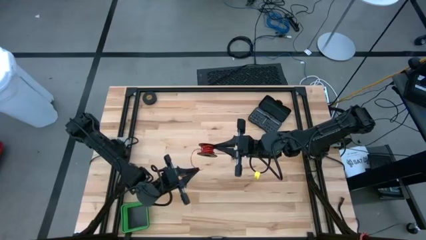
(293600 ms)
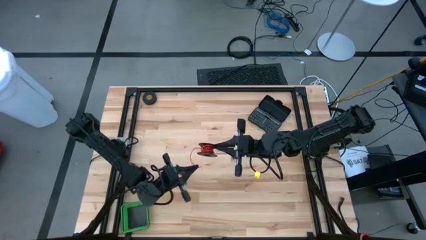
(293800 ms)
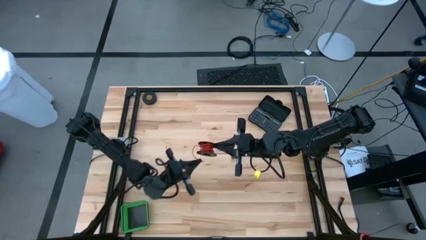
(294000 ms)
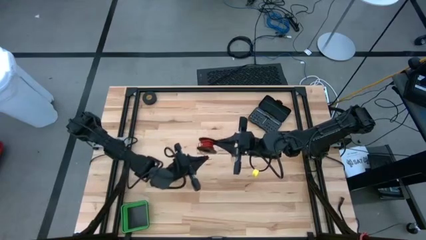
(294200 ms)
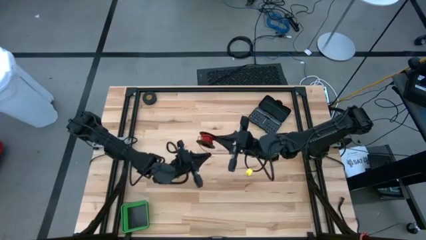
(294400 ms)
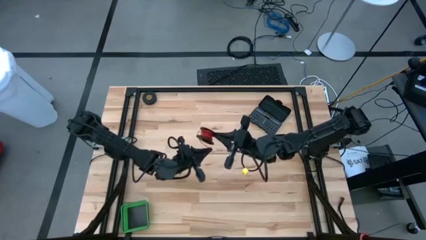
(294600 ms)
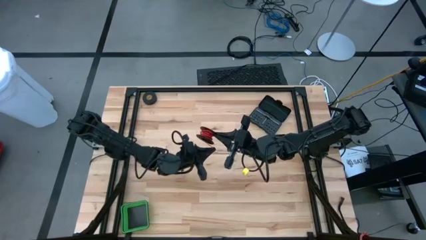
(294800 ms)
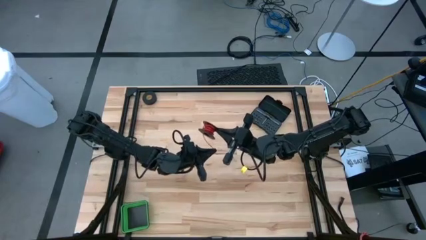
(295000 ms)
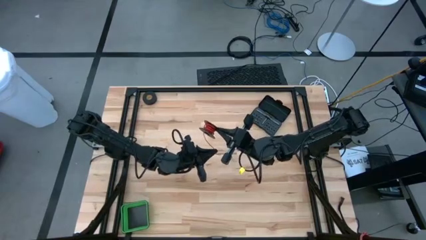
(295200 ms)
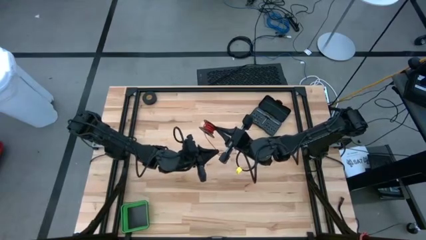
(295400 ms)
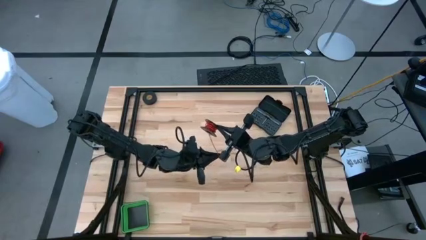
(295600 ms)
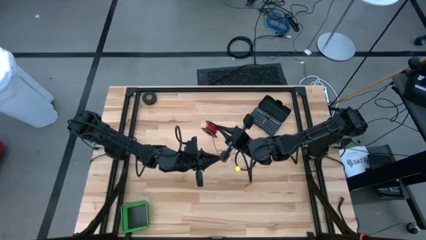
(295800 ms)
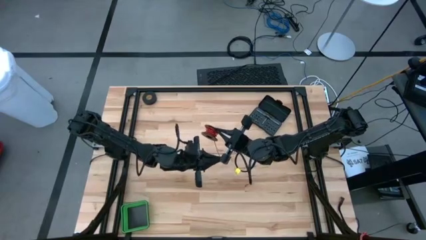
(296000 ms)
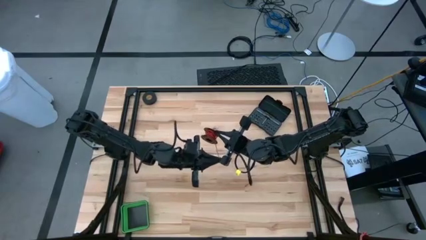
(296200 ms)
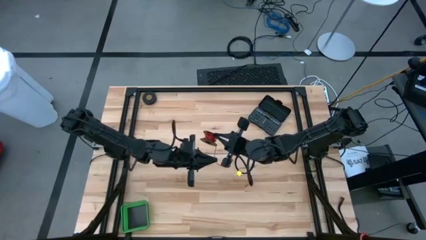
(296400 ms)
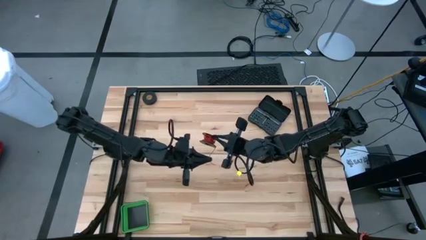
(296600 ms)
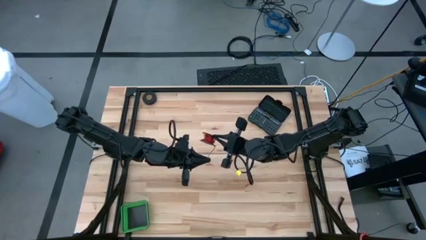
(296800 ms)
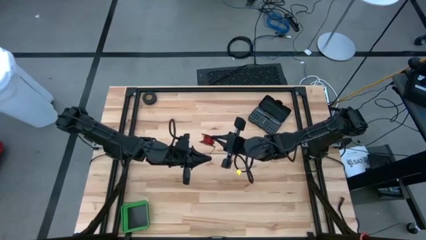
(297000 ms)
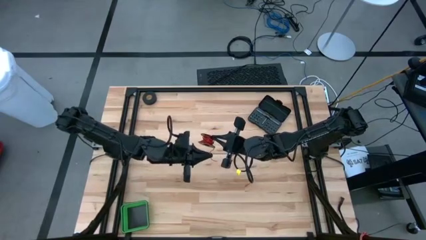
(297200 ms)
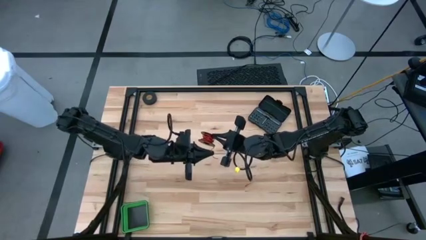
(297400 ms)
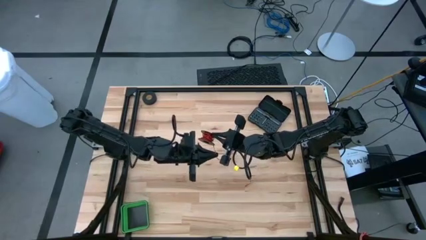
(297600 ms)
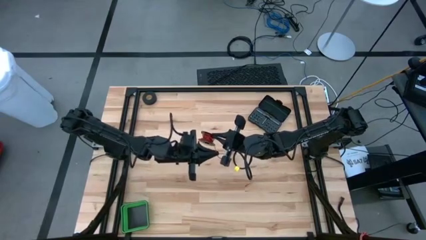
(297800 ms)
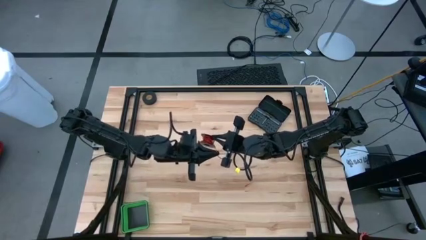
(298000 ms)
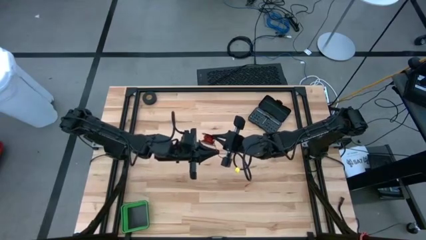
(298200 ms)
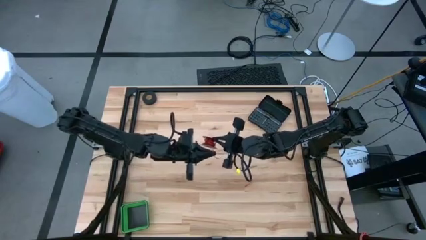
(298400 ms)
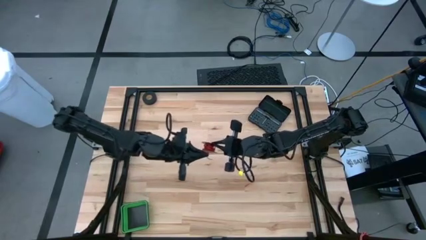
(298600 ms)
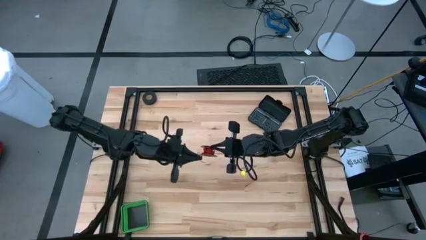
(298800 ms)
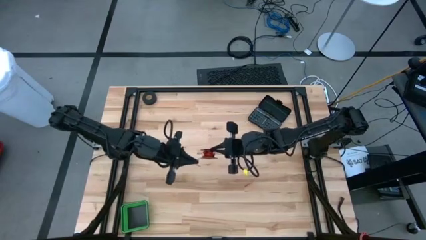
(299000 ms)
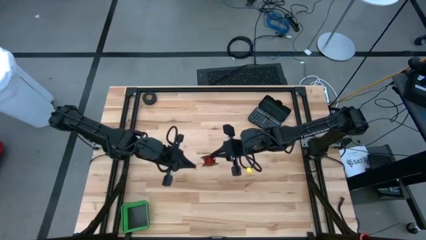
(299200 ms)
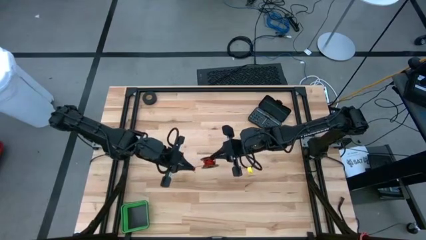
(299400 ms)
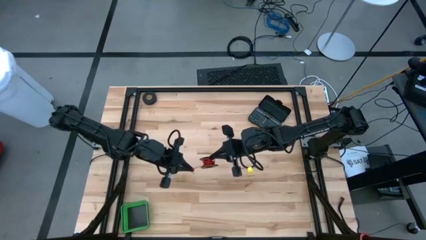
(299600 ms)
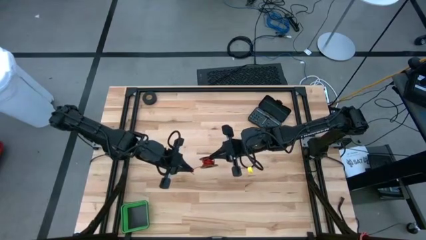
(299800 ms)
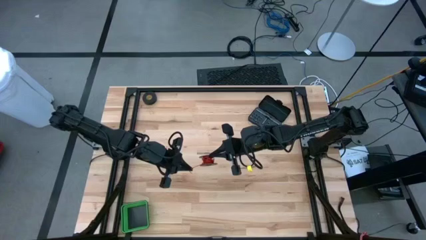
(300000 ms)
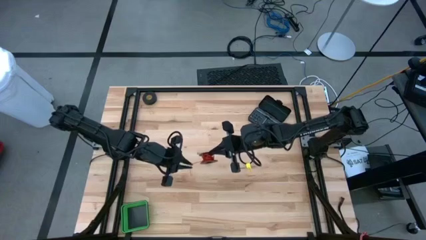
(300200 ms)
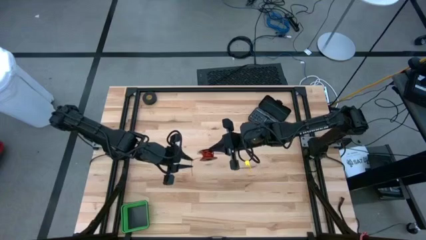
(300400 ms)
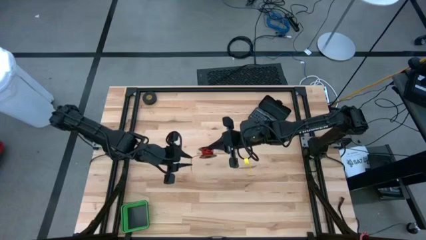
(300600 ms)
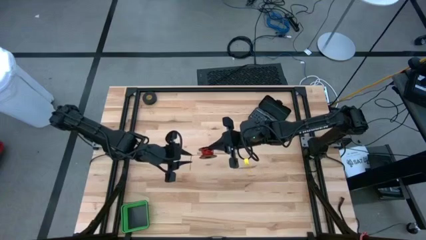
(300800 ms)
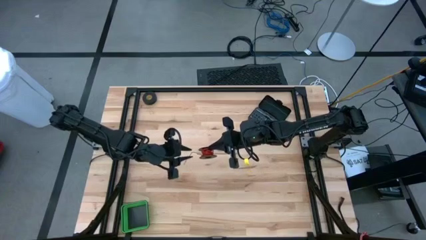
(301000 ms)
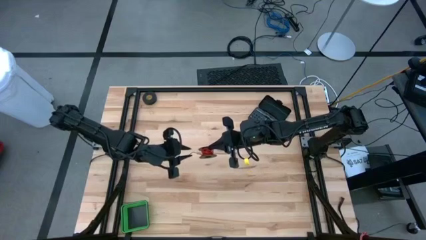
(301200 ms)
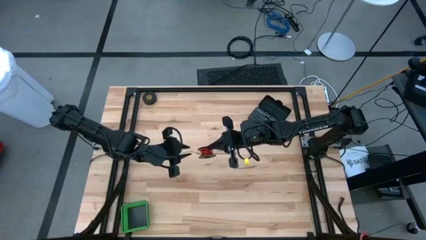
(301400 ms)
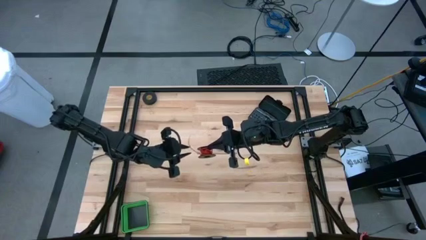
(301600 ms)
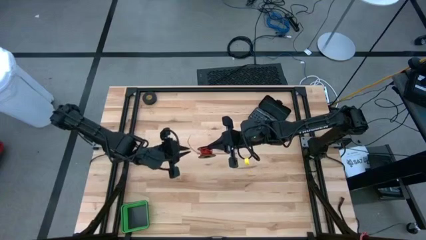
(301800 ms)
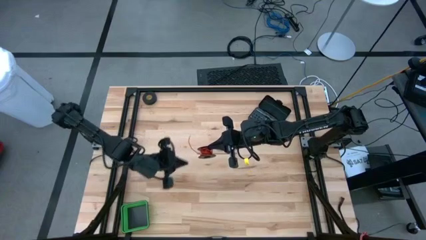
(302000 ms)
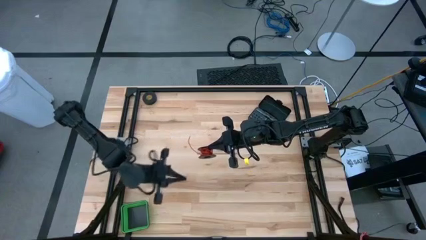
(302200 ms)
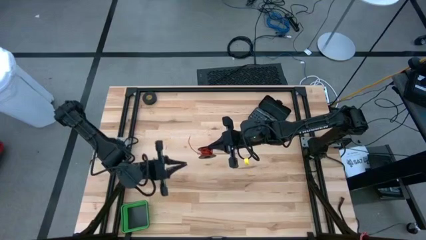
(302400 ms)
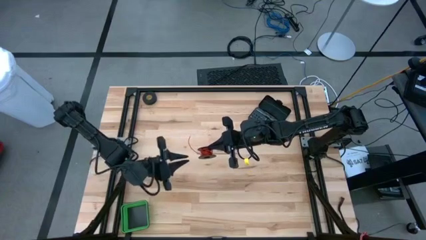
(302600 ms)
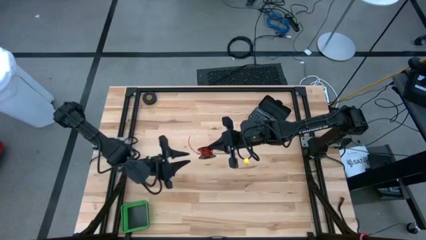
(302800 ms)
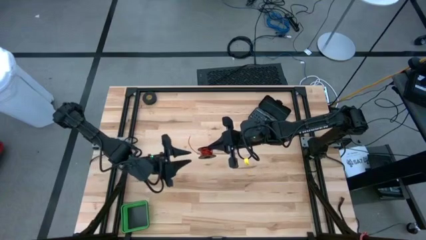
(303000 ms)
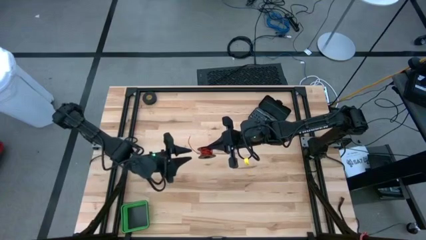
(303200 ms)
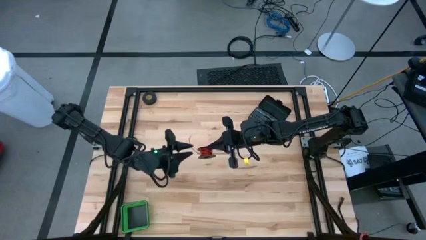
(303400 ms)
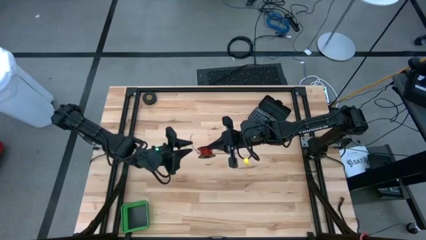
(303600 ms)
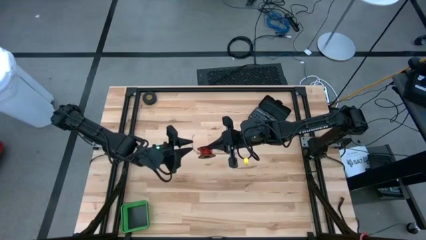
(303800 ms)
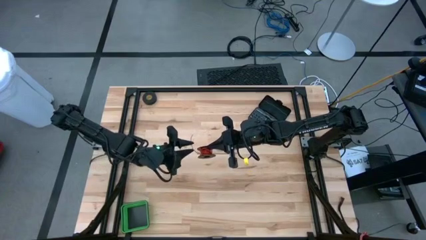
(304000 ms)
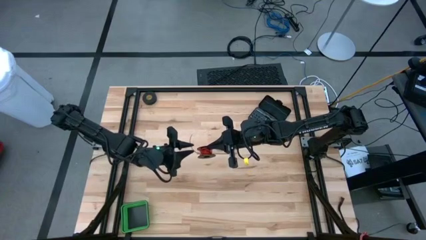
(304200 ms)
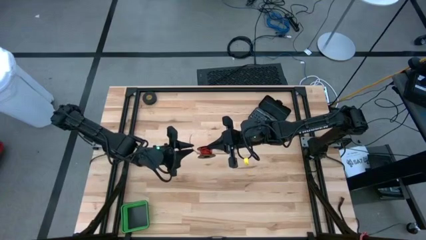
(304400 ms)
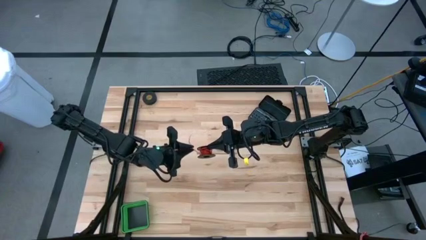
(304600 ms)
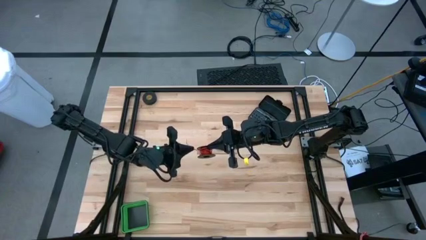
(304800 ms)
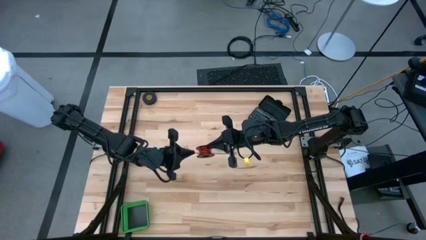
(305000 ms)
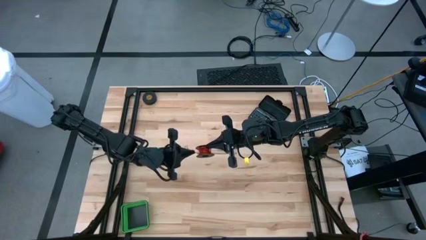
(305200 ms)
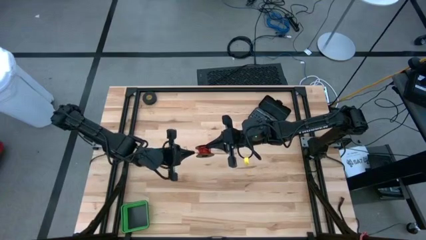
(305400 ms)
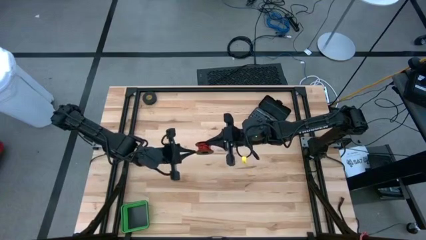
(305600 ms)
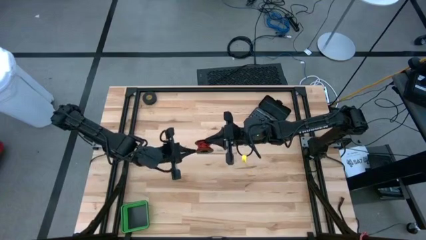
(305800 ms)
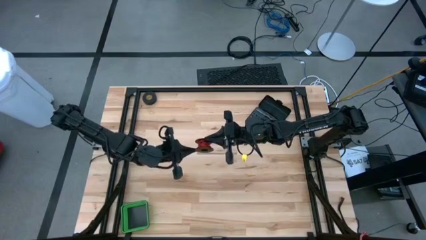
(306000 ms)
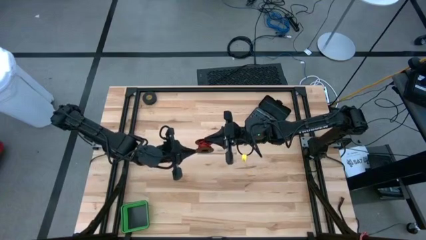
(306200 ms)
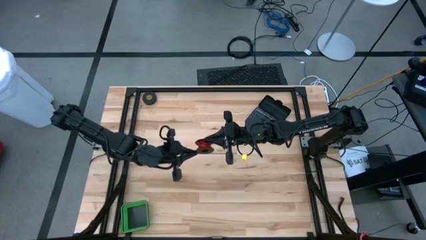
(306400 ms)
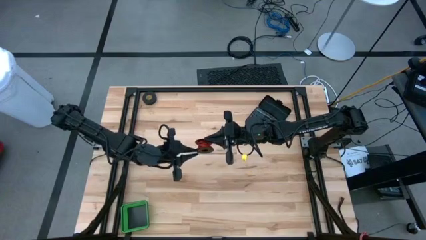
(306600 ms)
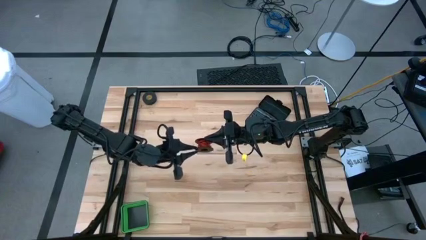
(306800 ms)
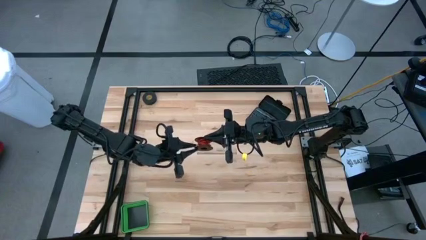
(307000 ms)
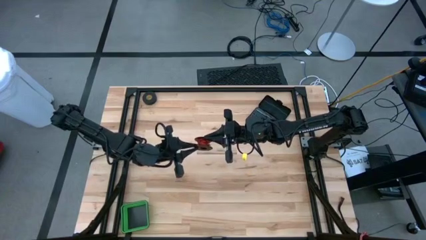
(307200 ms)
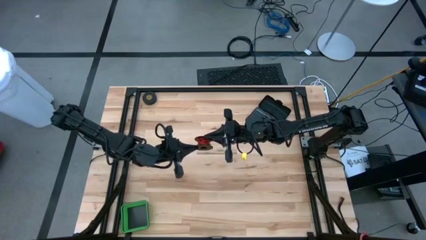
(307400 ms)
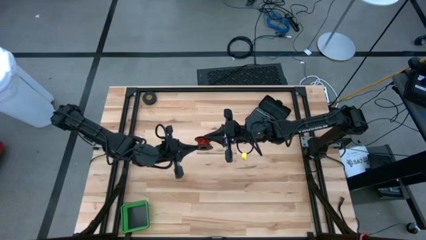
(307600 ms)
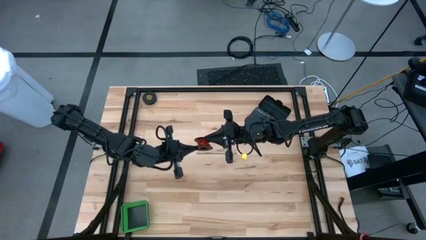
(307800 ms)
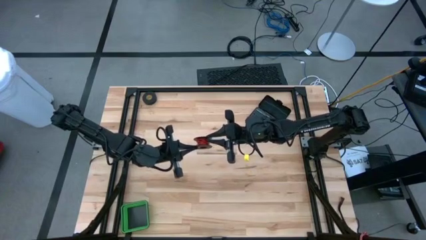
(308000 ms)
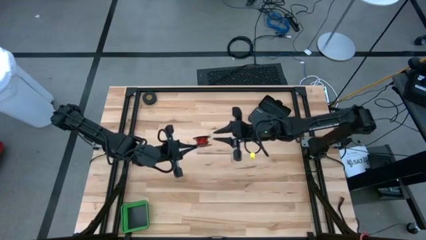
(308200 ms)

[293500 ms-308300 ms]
Task: Coil cords
Coil the red wire into the spool

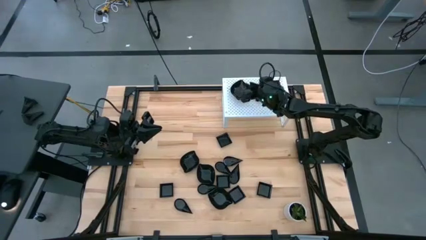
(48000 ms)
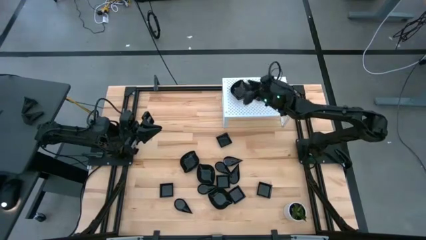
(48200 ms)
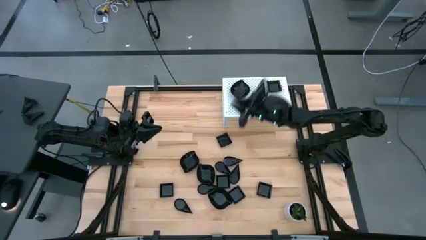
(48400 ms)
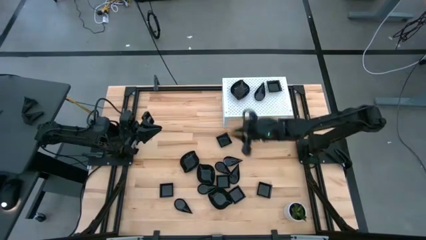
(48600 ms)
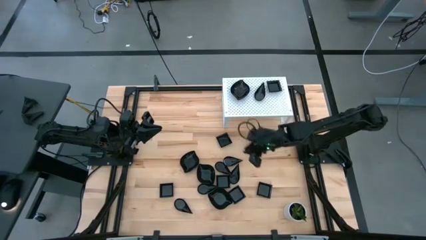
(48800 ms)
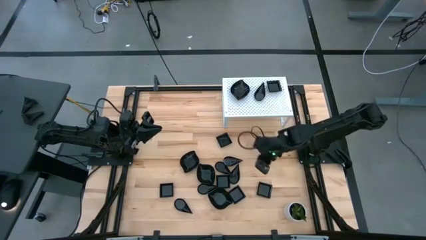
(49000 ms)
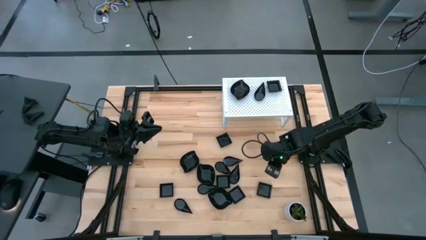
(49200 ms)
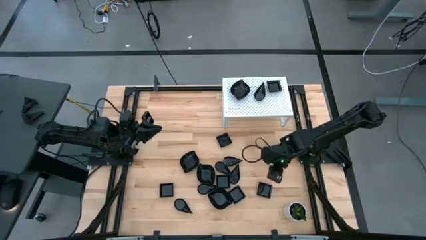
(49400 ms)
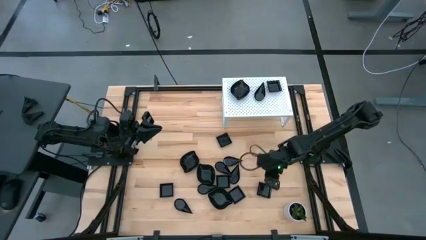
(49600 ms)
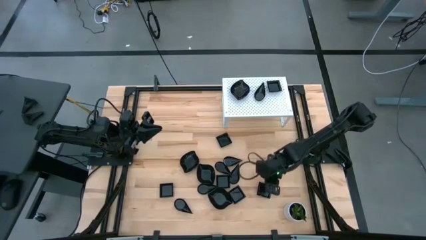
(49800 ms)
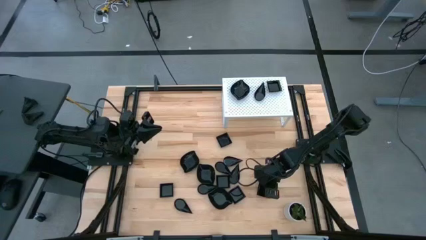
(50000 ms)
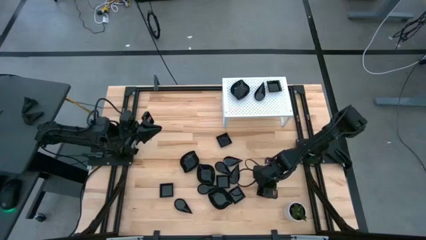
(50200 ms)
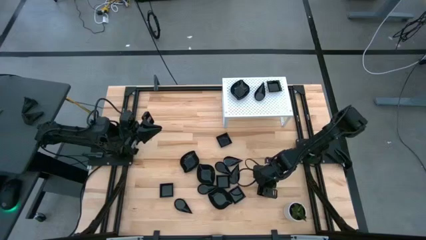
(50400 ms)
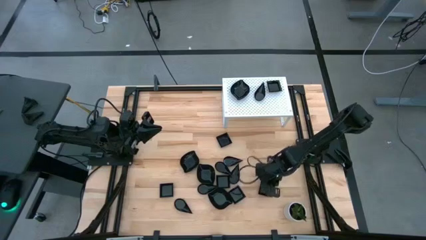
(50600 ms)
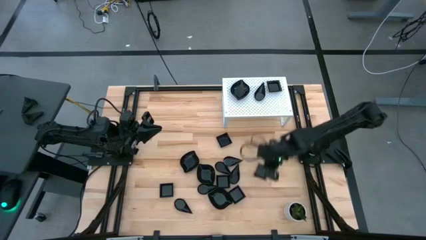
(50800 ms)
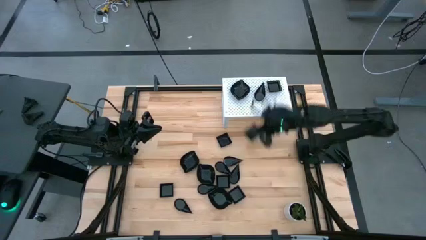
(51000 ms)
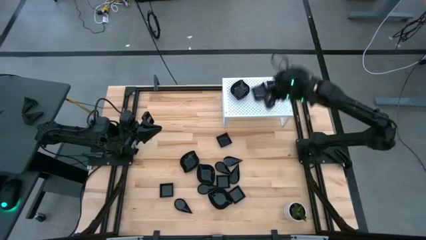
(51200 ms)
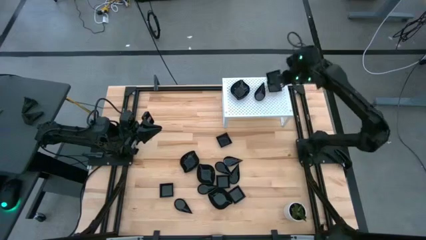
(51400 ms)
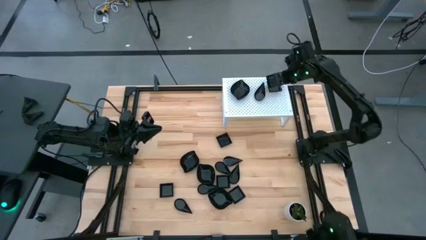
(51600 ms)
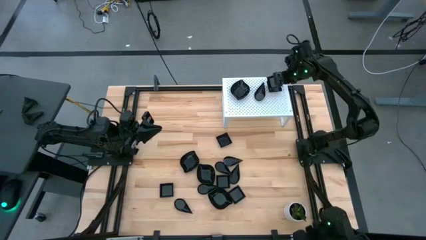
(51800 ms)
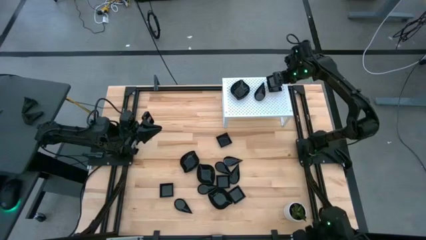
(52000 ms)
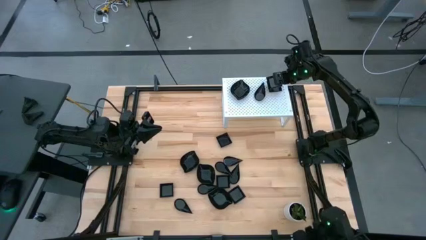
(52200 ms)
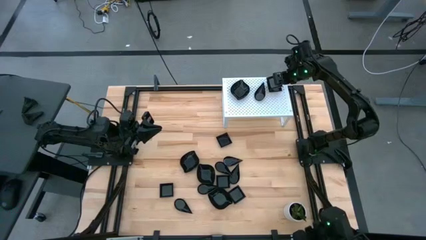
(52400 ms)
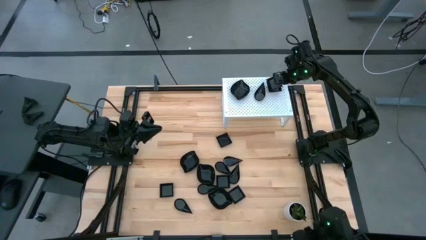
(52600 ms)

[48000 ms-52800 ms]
Task: Pick & Place Mini shaped plates
Stack the square plate on top of the square plates on the shelf
